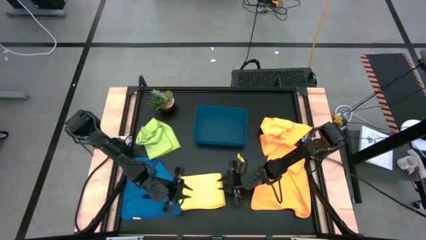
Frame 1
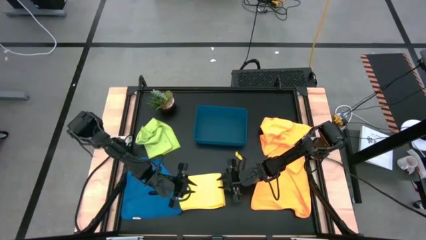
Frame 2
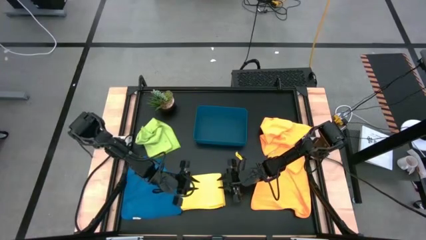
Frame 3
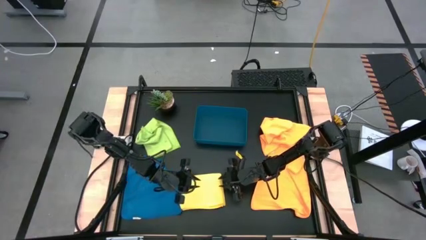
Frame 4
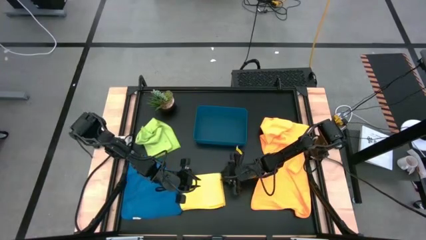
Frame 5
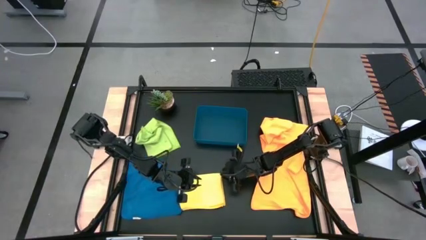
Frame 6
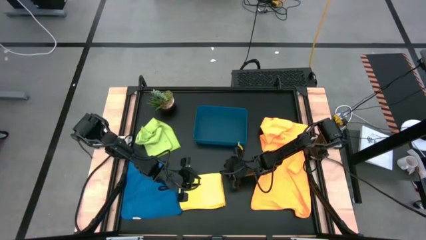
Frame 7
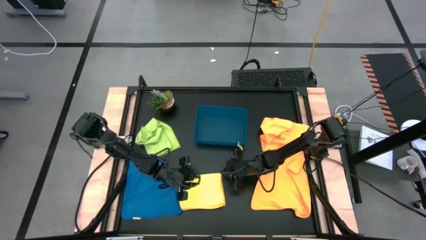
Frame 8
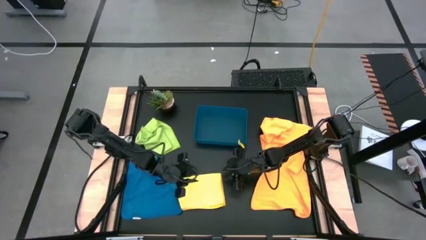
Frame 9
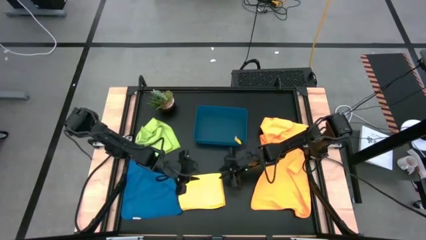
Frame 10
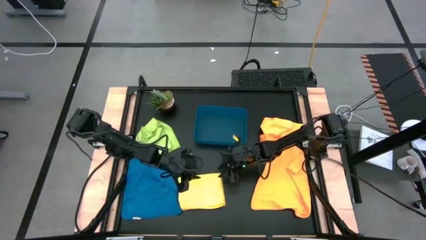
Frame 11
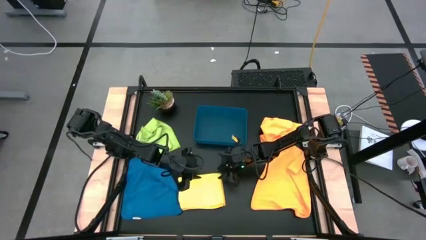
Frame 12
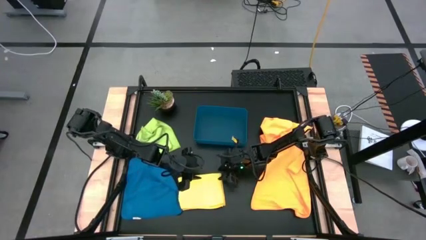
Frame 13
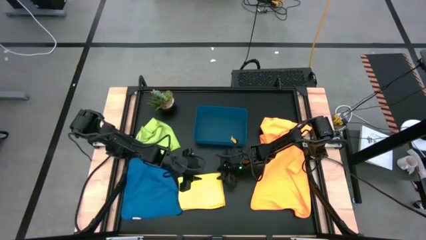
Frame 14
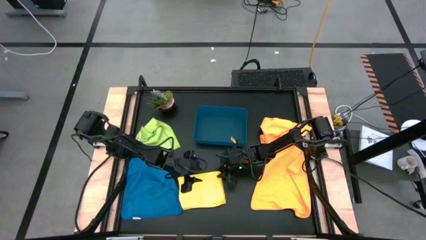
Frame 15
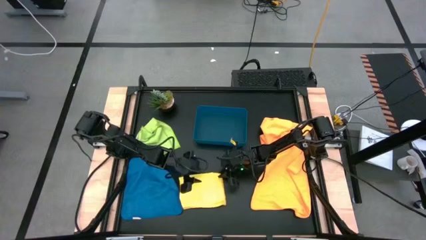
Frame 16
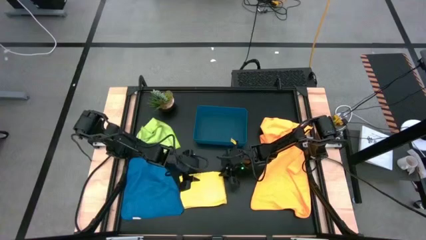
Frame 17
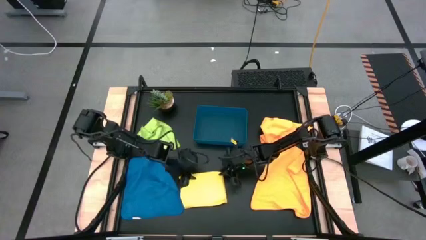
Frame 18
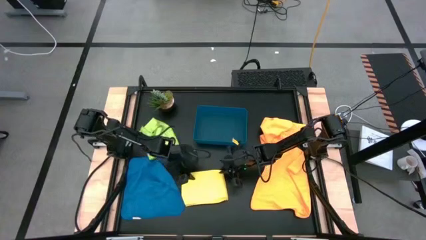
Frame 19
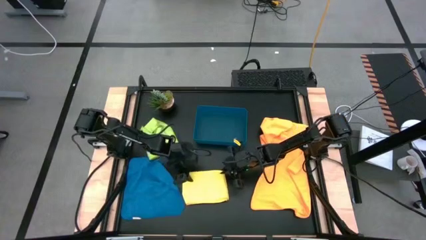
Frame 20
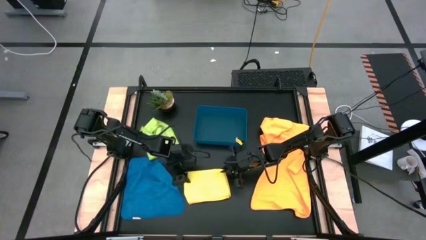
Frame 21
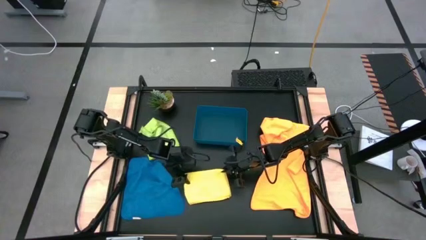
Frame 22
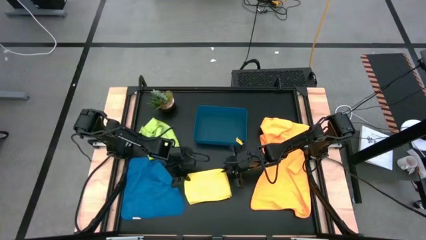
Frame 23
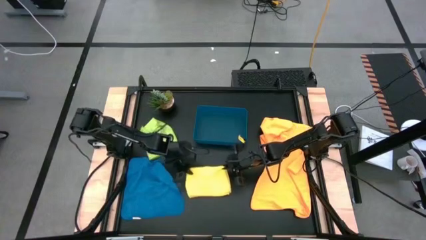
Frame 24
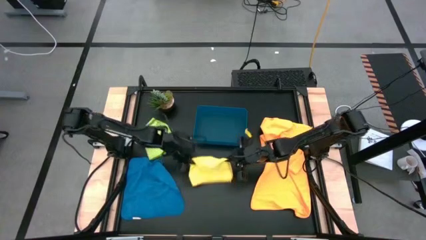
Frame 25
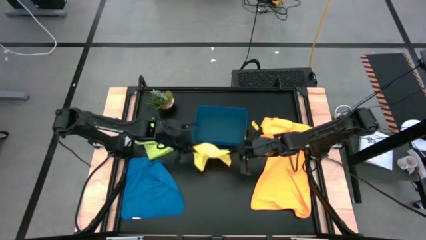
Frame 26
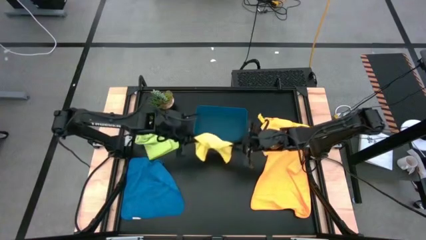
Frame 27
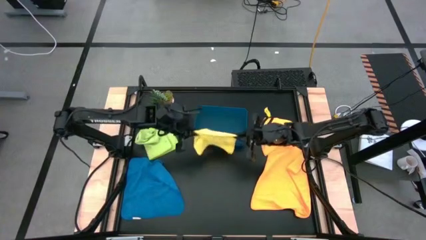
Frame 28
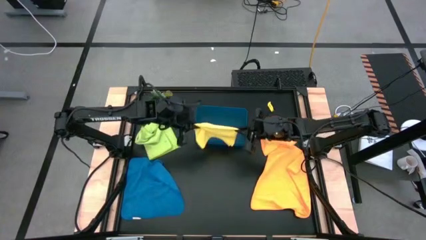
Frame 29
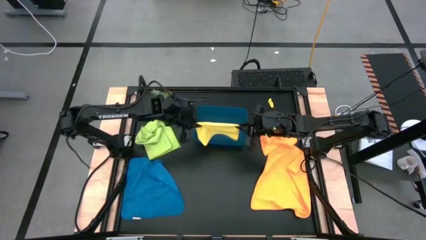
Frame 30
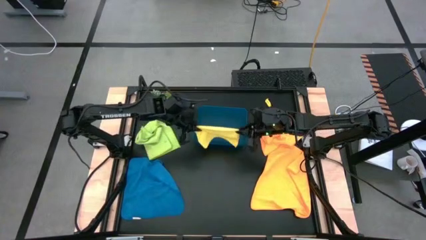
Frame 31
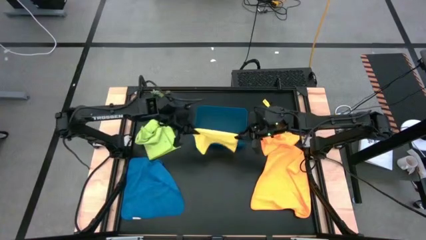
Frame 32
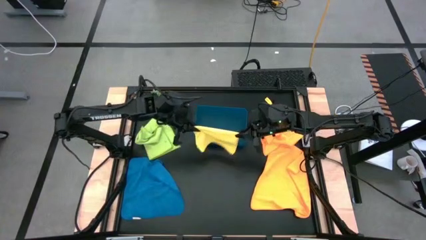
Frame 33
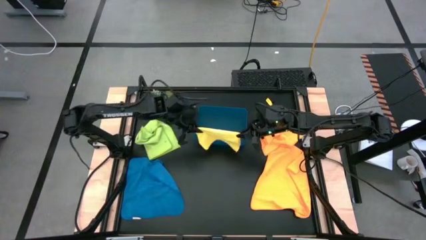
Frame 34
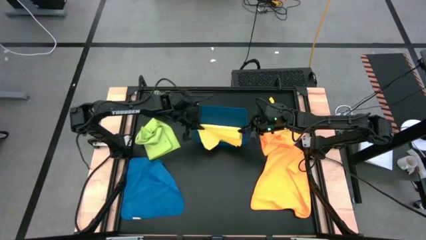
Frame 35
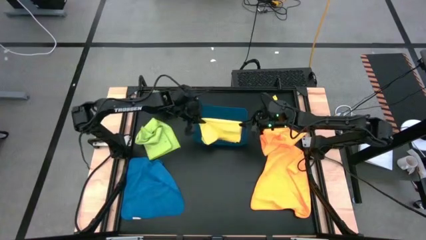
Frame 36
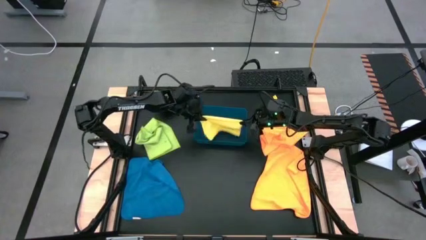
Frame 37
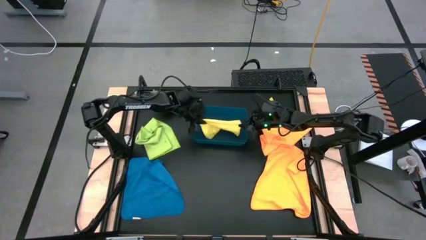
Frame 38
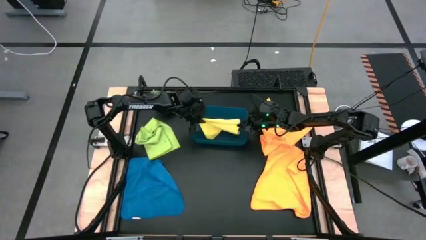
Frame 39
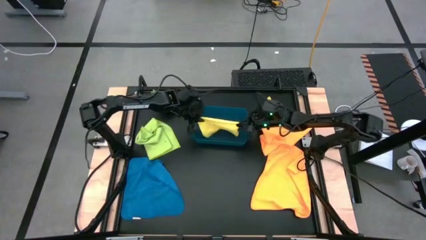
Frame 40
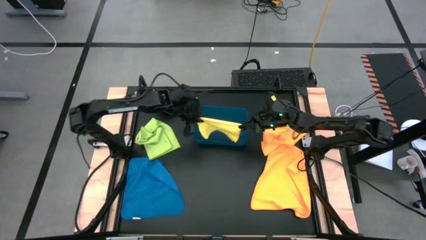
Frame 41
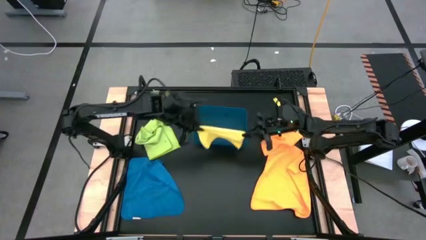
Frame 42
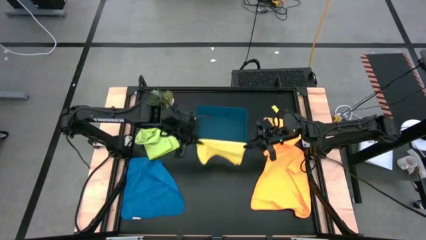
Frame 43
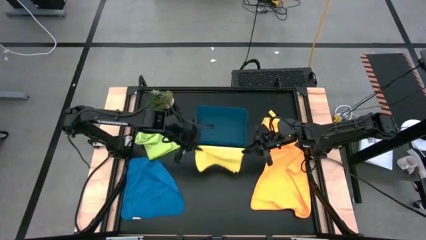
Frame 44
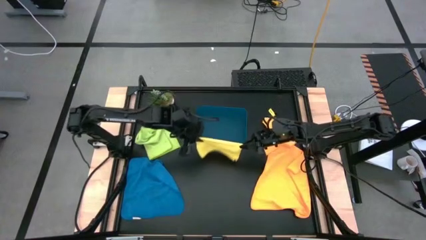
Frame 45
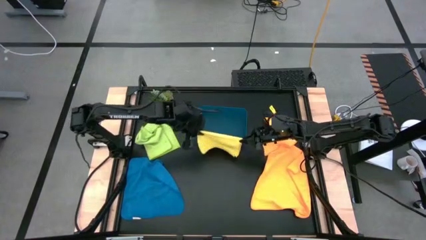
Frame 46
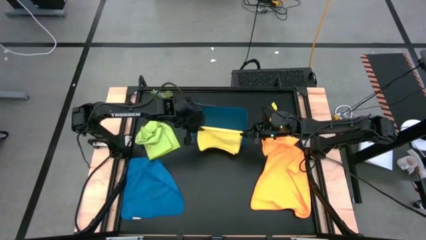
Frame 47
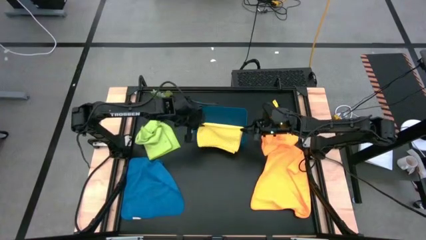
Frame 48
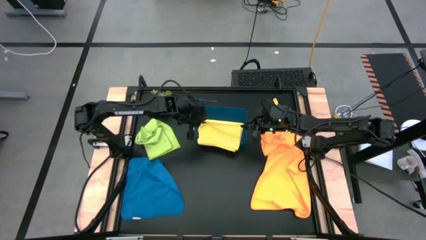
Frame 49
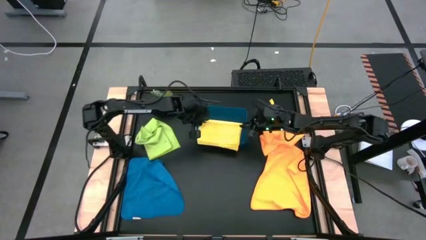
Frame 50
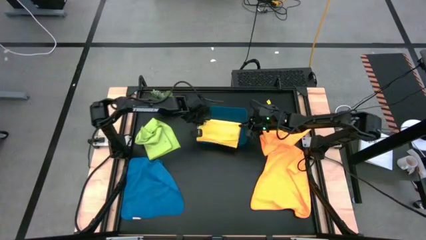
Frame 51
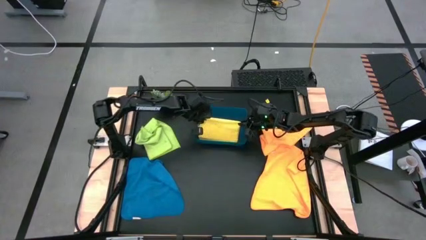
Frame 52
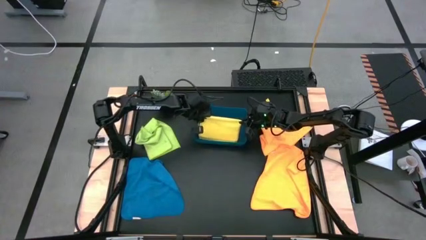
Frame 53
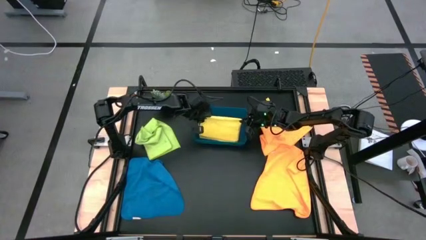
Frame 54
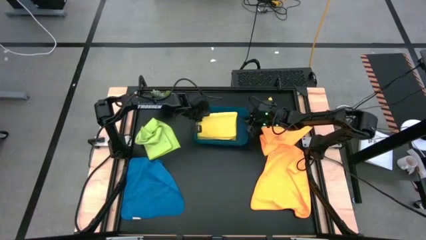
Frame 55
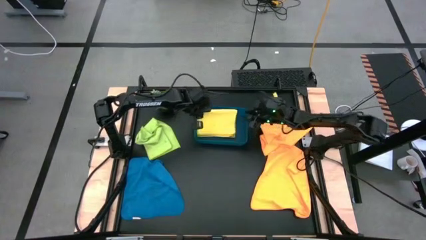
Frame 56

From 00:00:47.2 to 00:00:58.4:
Task: Fold microfiber towels
Put the folded yellow microfiber cloth into the blue bin

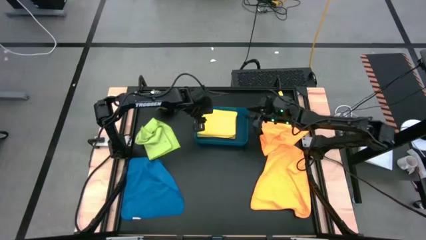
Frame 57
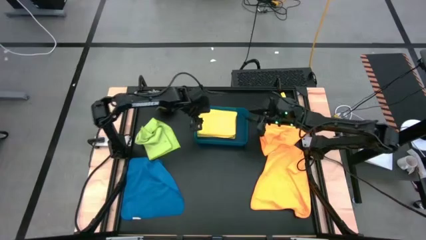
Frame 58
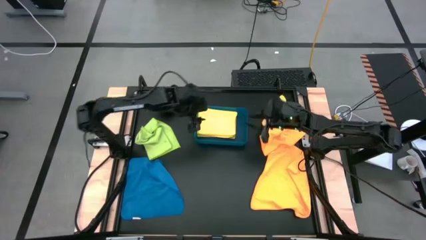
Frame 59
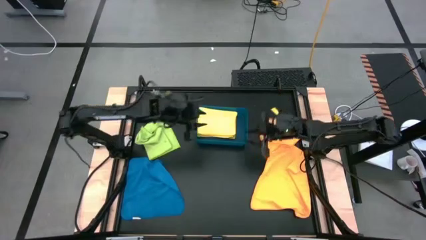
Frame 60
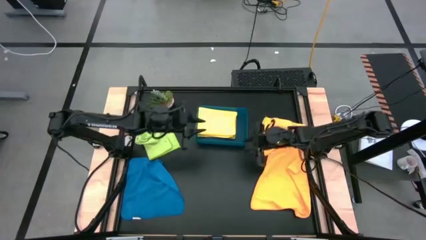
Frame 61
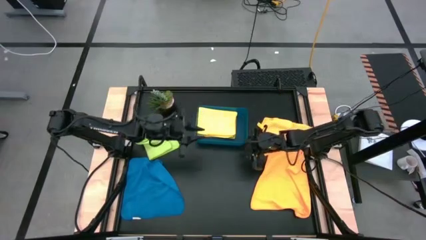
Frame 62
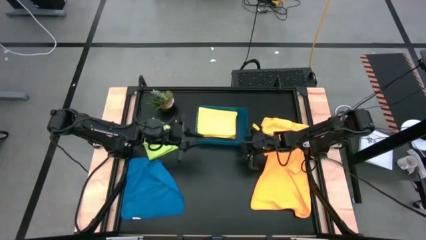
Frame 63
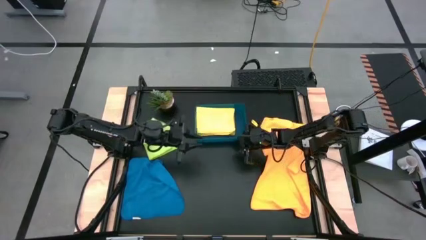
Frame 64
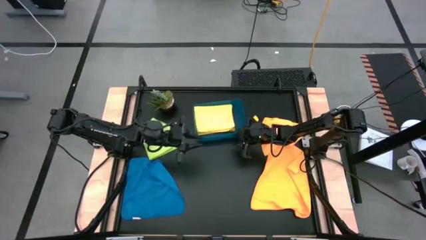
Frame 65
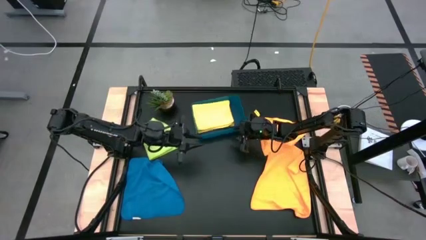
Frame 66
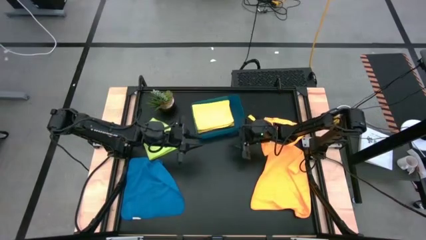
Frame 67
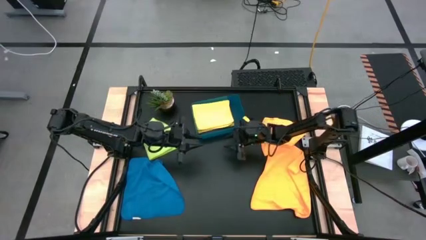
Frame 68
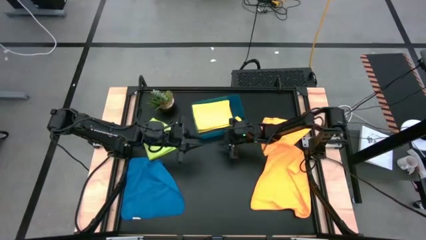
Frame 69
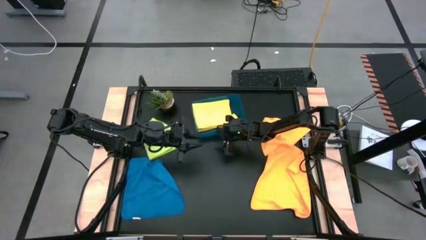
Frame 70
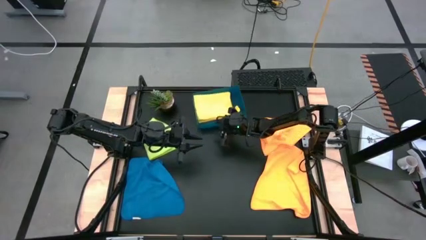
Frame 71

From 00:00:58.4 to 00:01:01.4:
Adjust the blue bin

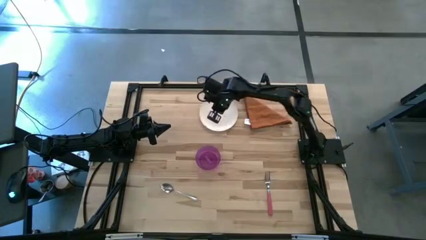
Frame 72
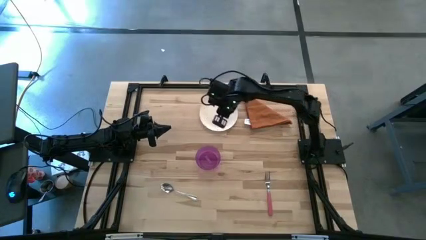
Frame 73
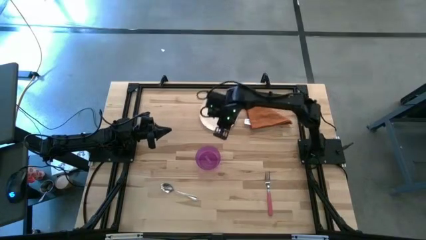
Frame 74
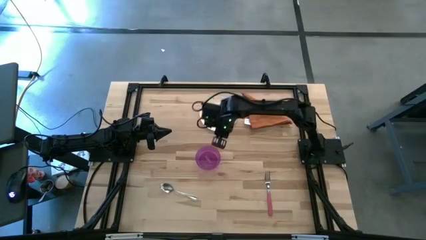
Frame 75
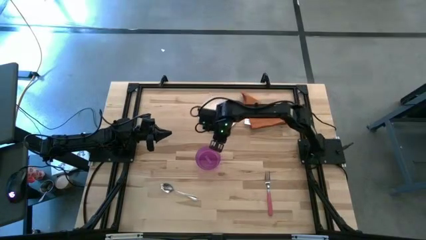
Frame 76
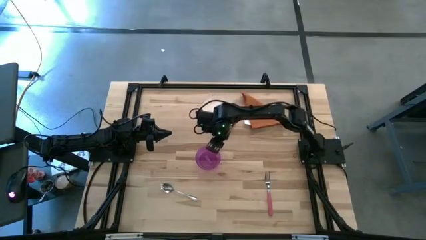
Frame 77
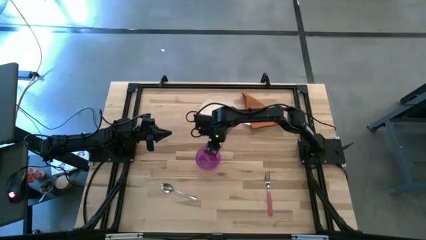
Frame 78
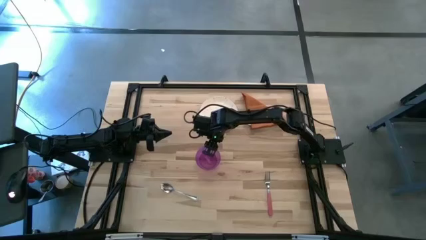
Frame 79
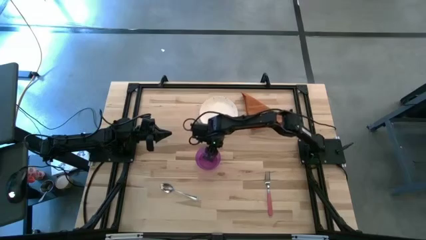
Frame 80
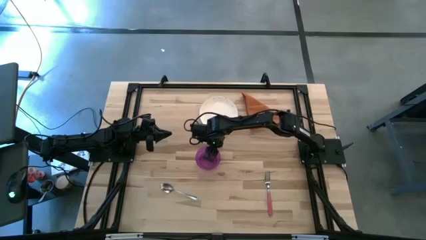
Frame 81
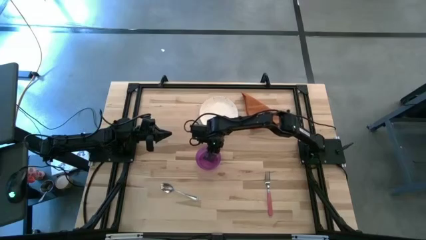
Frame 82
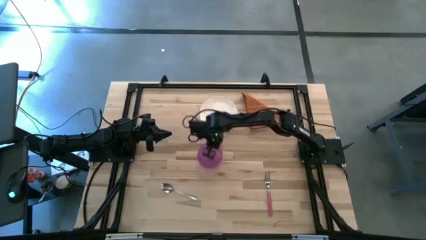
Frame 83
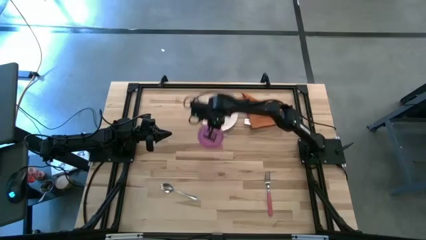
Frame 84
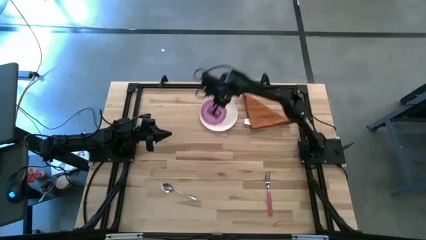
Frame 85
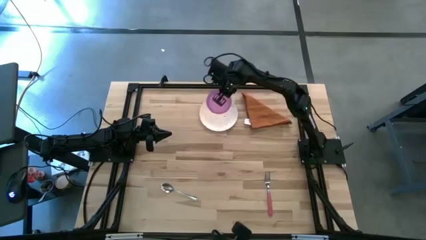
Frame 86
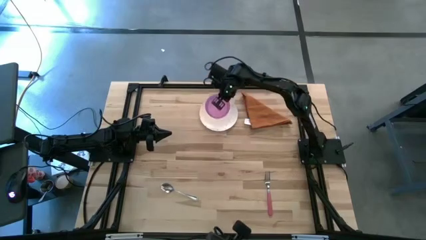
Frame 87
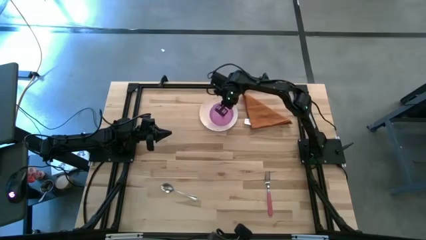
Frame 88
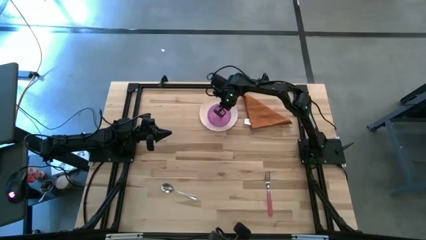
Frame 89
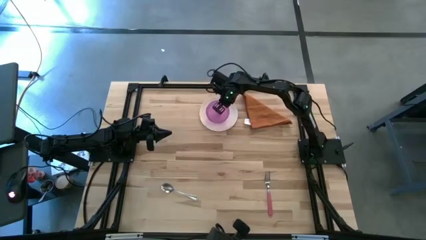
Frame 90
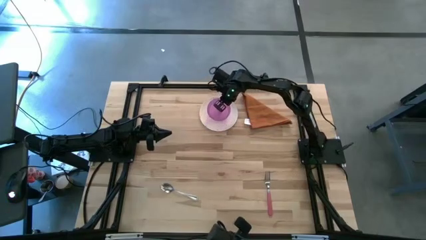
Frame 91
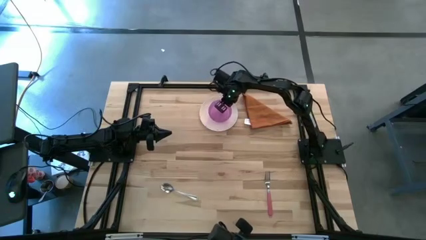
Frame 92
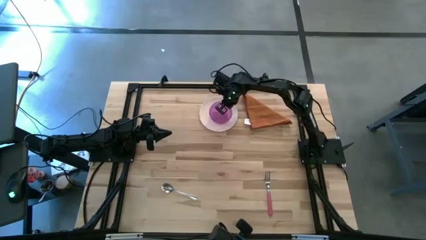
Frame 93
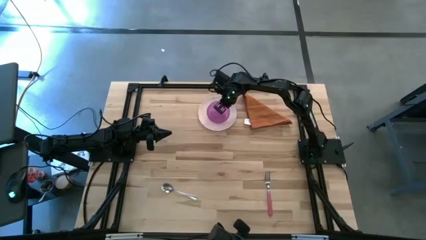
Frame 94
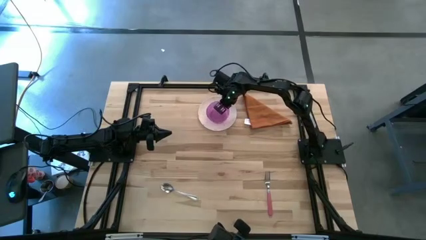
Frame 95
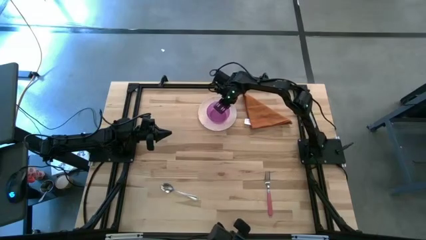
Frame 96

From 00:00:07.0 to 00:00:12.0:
Task: Set table place
Put the purple bowl on the white plate
